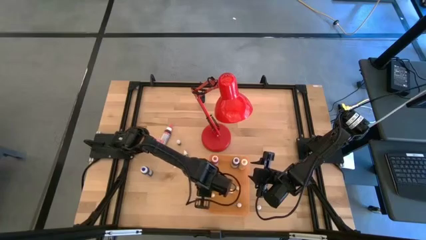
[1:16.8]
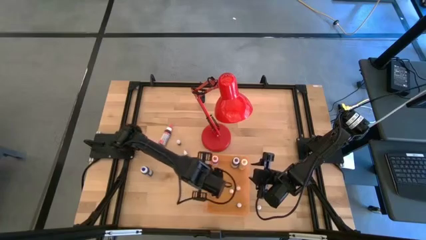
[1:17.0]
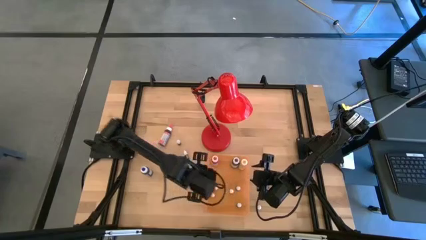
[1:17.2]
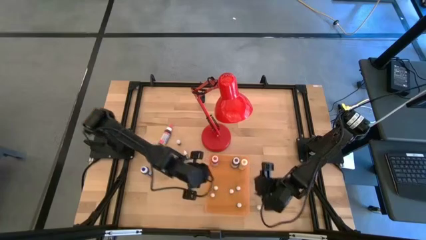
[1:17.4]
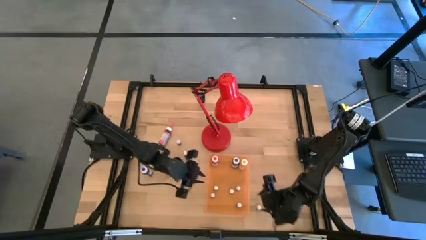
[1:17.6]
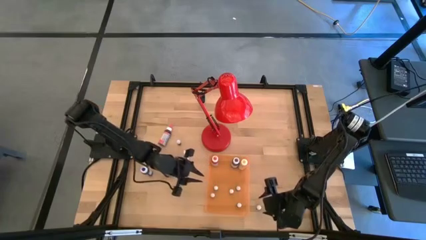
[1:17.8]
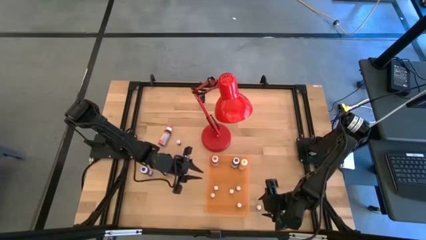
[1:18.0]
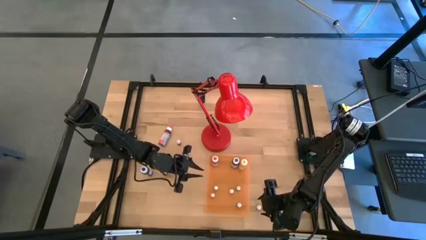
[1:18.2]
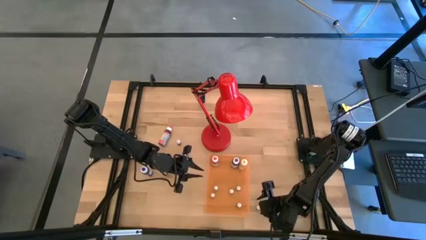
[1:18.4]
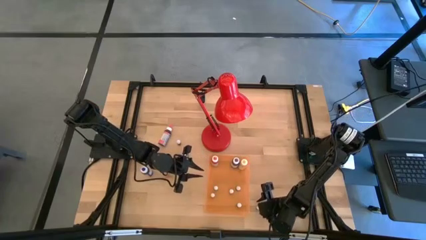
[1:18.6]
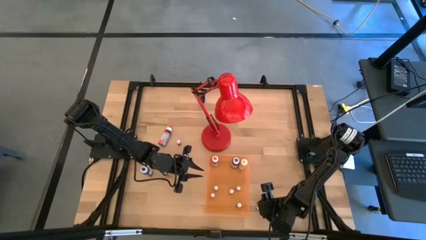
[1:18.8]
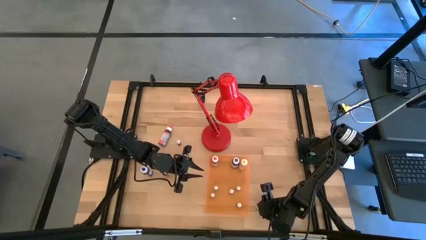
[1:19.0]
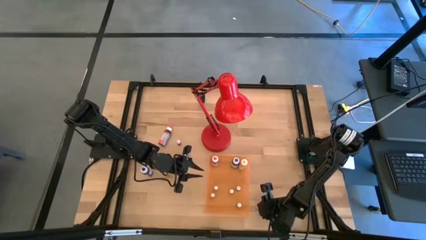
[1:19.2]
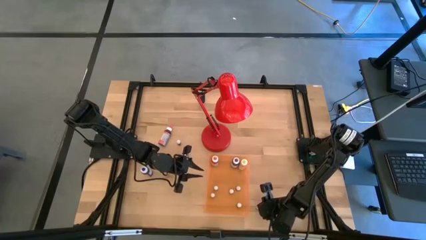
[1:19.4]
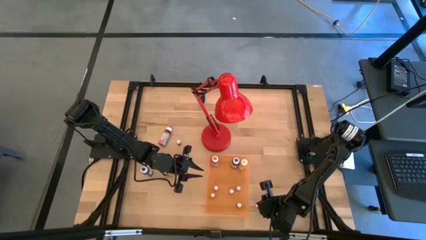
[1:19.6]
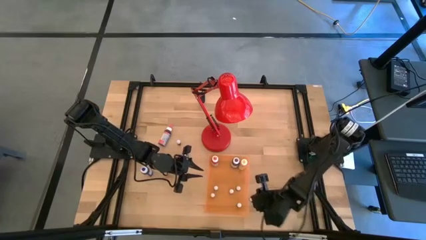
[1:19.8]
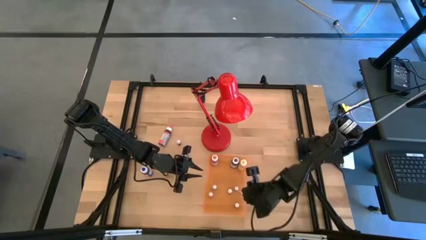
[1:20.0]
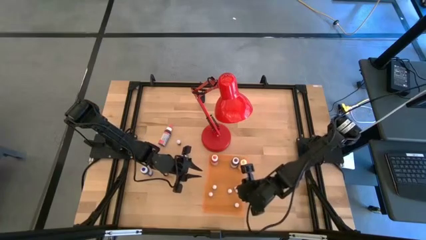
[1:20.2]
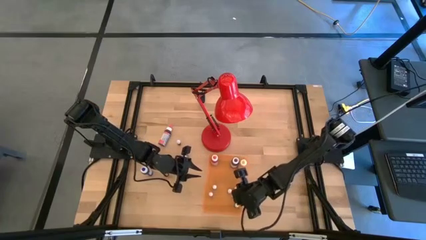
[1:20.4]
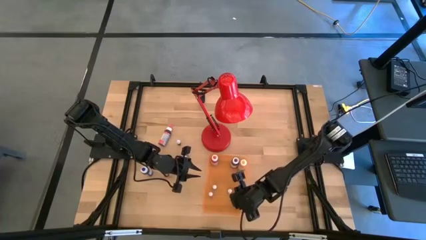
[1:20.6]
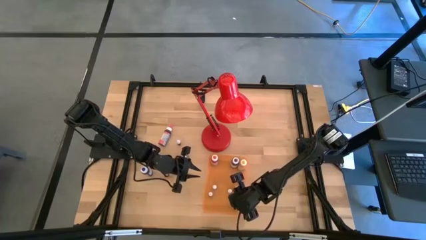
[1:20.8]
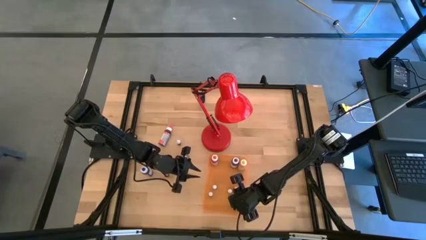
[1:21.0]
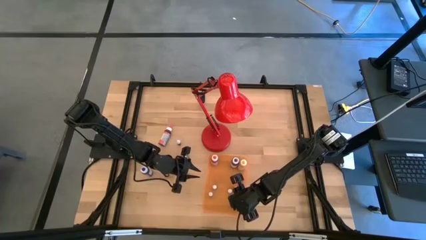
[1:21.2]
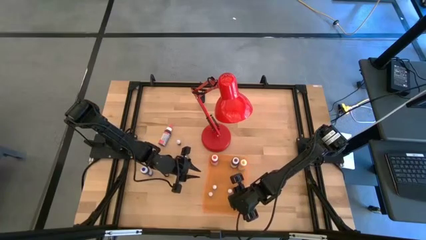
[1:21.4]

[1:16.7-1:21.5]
Task: Pick & Place food coloring
Put the bottom small black food coloring bottle into the orange bin

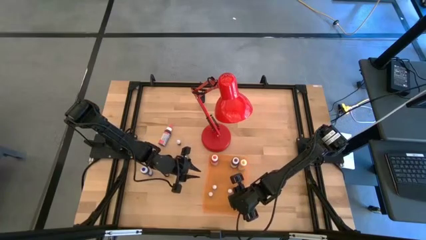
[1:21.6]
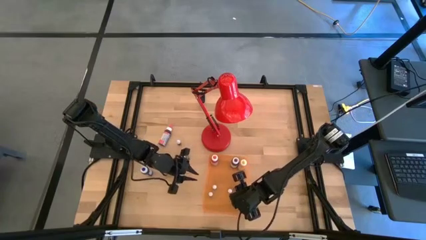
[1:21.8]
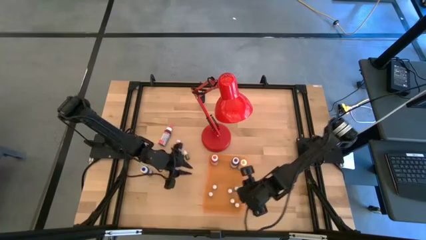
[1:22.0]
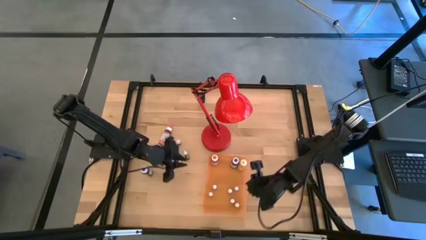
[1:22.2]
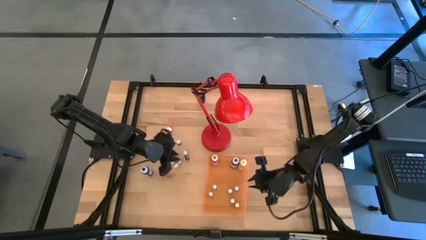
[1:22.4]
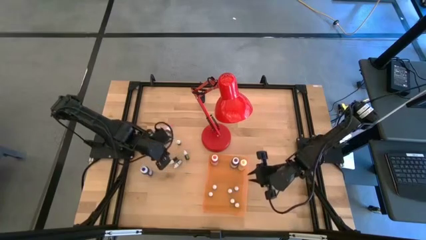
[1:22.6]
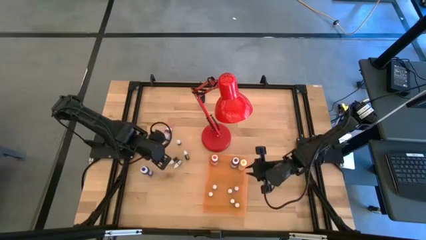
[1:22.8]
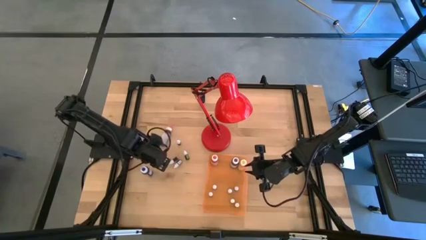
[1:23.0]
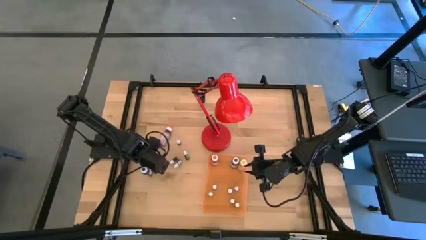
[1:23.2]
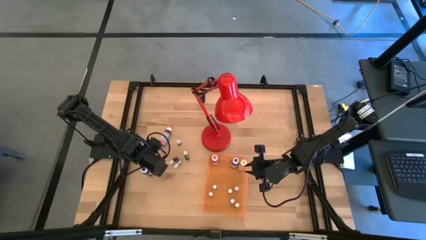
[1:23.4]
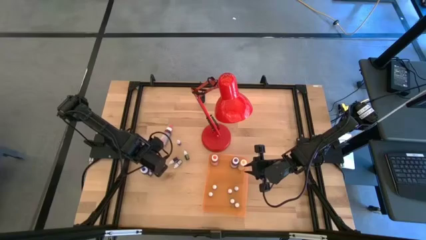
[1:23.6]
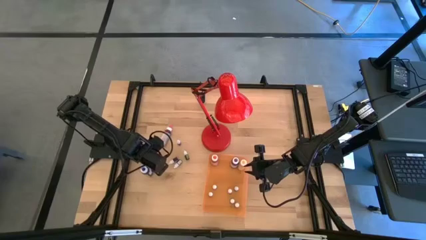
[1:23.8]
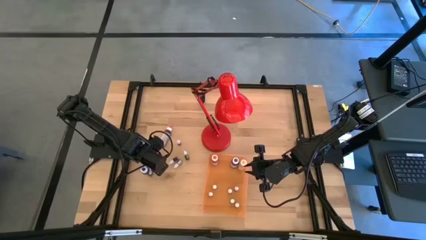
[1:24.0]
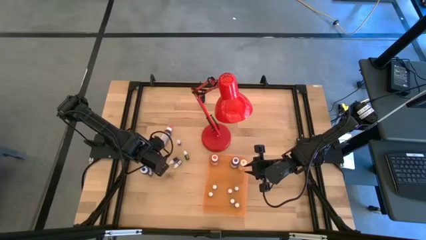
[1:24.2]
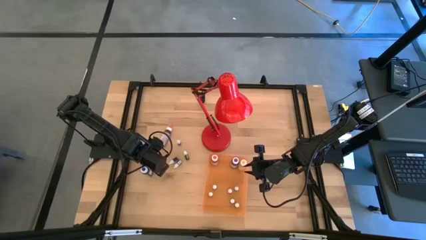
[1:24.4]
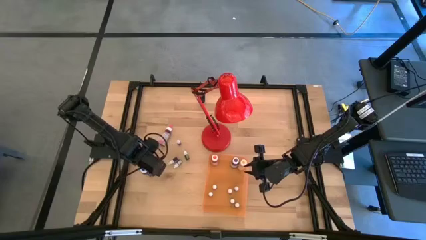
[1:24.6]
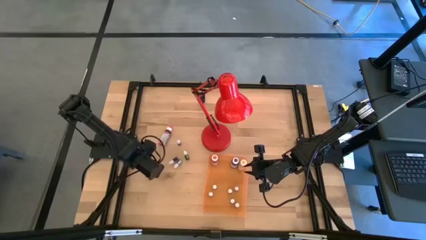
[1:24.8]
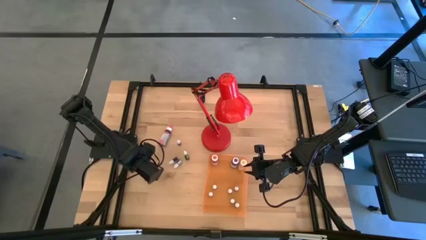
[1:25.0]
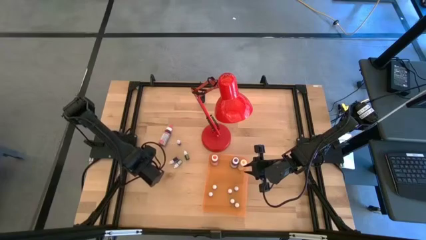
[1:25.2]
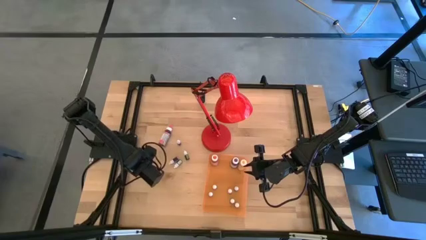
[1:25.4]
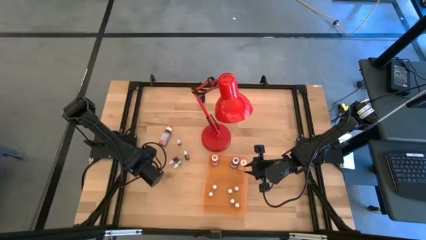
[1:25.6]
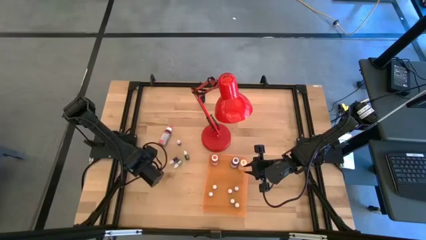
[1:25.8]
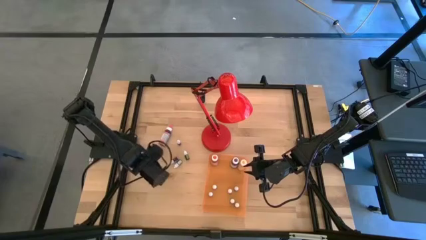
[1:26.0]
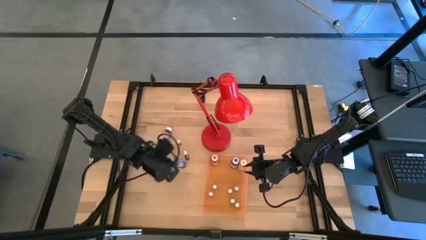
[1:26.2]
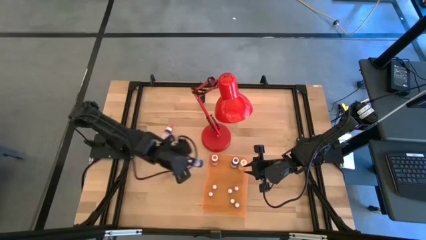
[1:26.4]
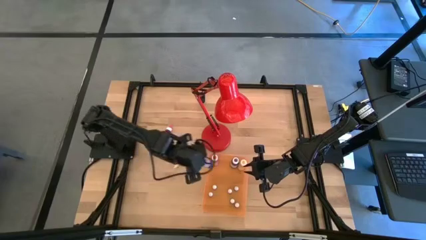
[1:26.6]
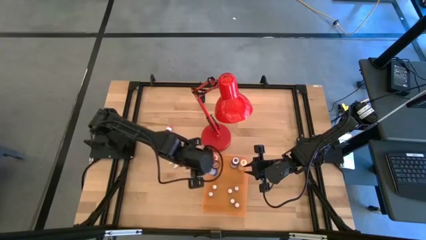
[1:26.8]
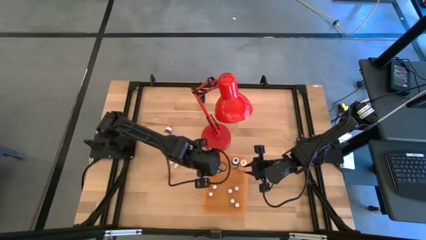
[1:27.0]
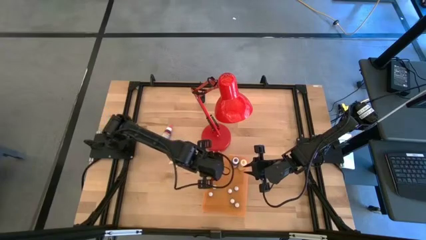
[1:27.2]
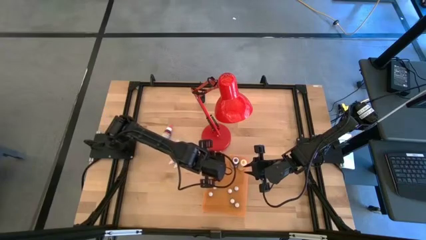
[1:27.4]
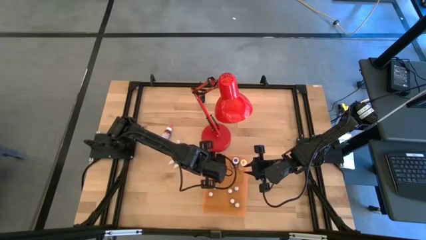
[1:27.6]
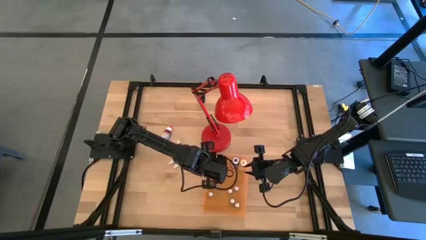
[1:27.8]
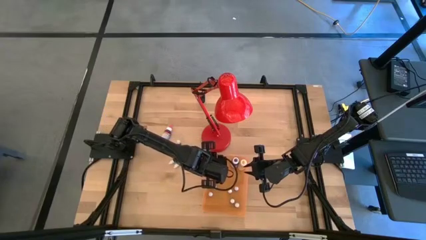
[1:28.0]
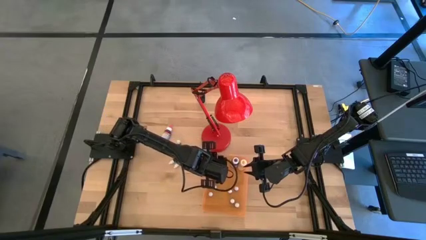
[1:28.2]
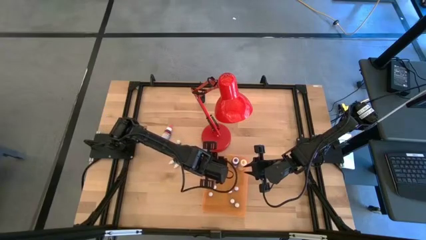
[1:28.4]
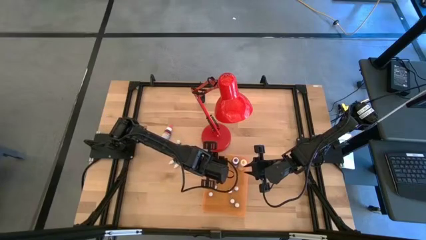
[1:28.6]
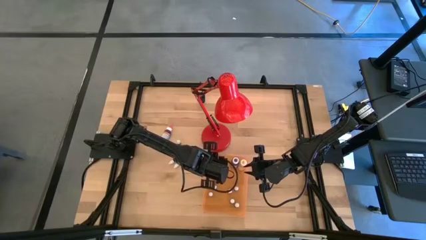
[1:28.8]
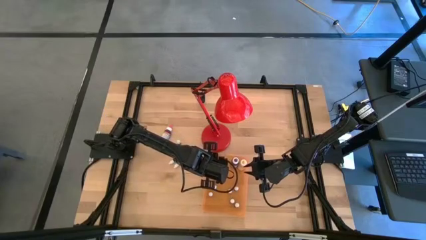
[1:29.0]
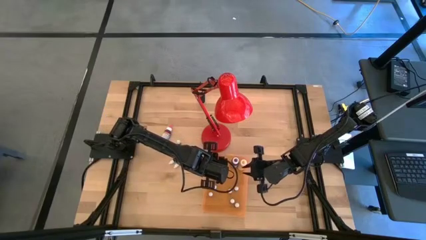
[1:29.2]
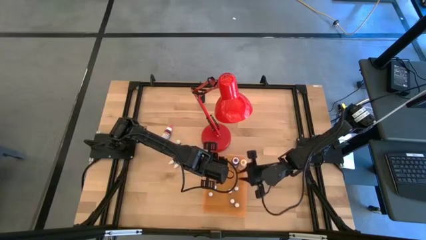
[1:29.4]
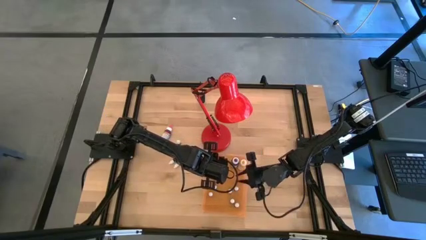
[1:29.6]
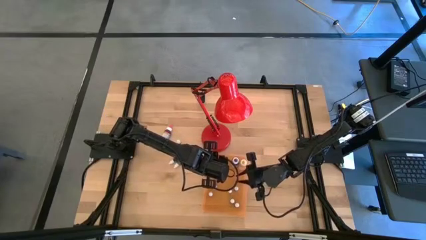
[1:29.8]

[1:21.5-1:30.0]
Put the large blue food coloring bottle into the orange bin

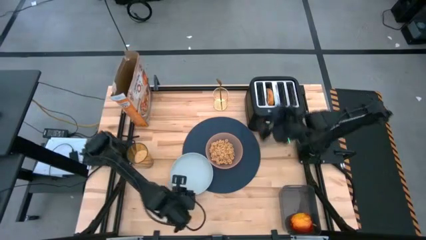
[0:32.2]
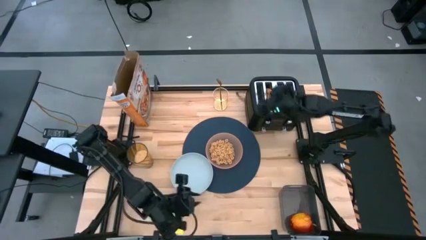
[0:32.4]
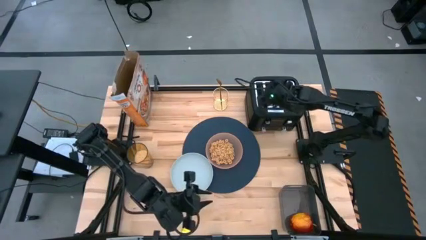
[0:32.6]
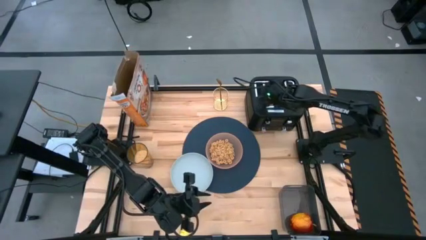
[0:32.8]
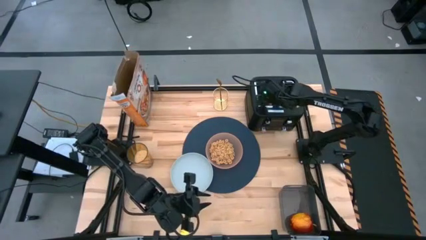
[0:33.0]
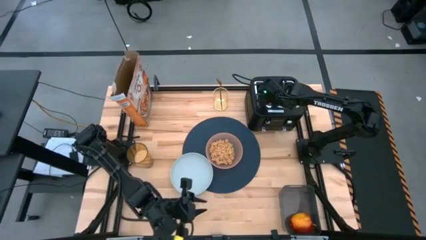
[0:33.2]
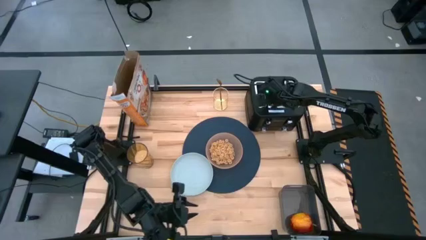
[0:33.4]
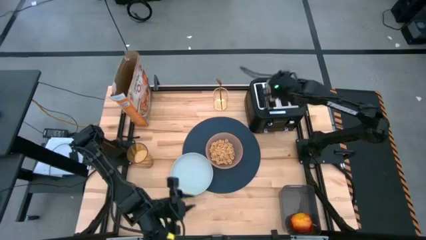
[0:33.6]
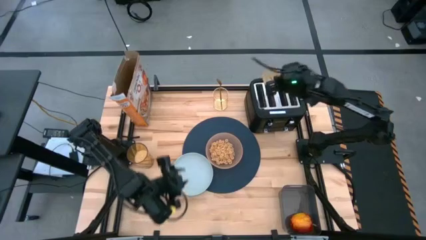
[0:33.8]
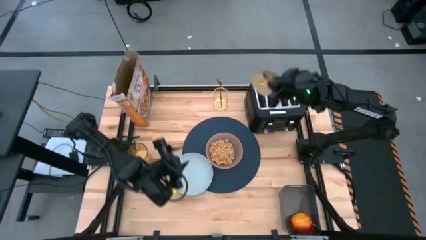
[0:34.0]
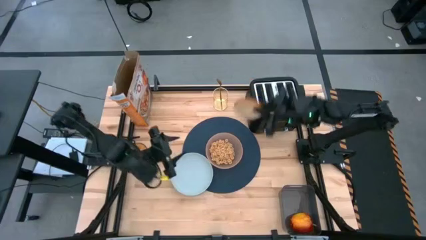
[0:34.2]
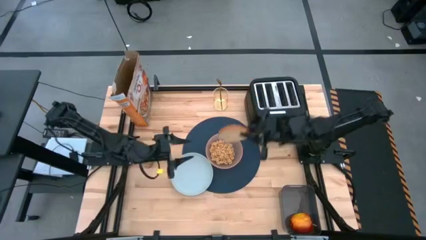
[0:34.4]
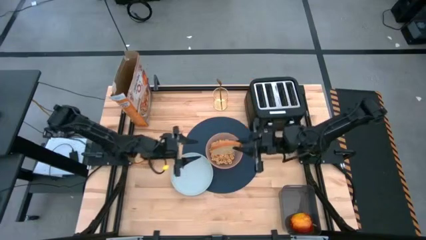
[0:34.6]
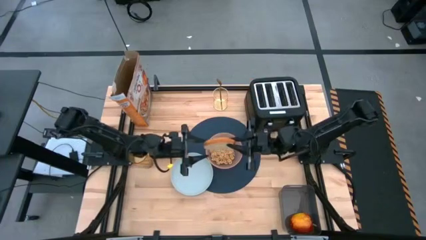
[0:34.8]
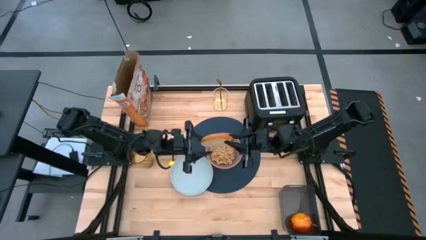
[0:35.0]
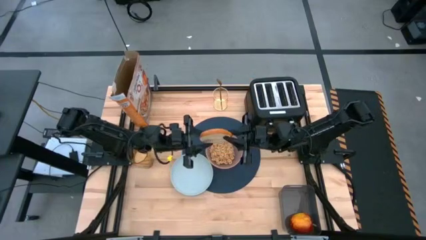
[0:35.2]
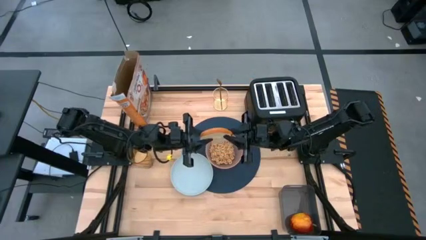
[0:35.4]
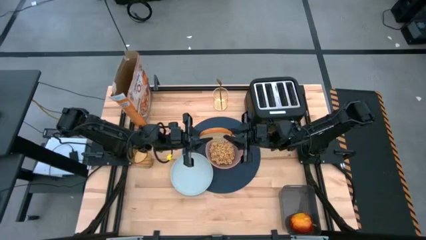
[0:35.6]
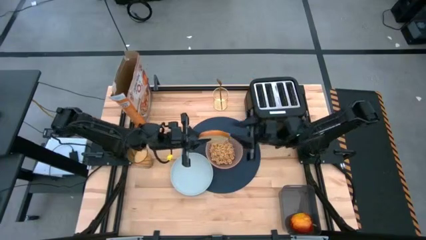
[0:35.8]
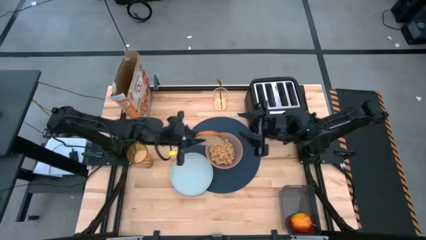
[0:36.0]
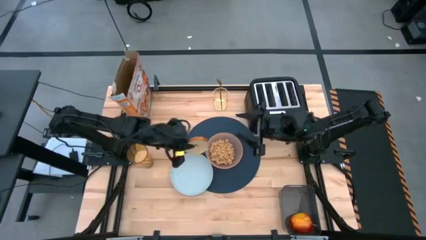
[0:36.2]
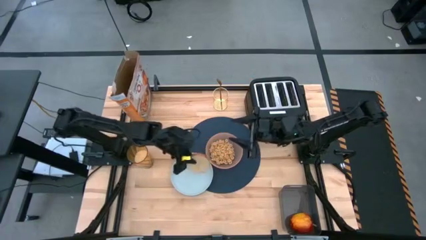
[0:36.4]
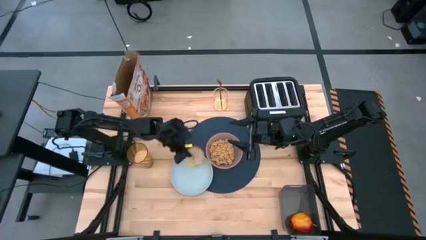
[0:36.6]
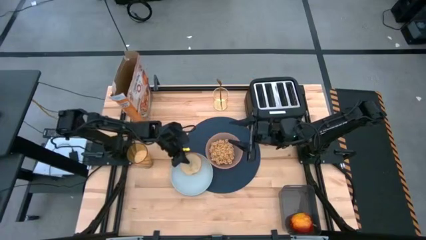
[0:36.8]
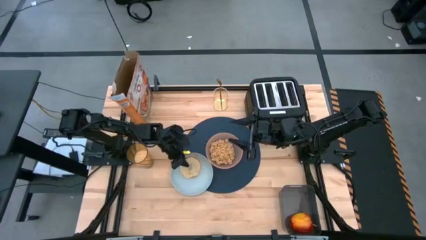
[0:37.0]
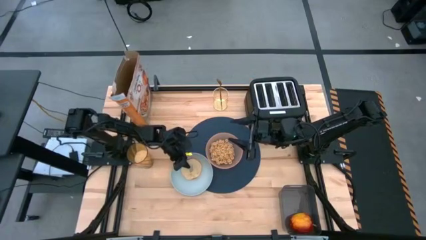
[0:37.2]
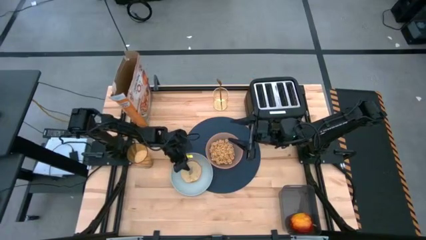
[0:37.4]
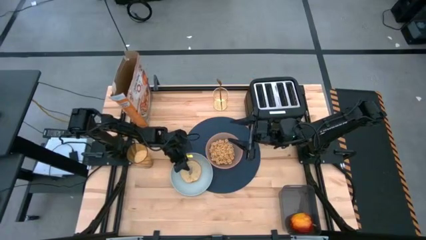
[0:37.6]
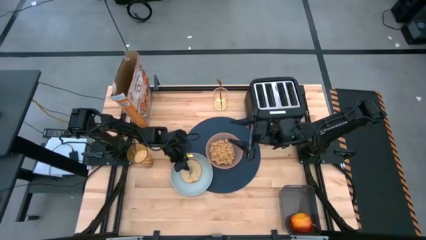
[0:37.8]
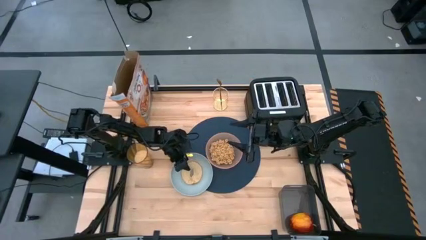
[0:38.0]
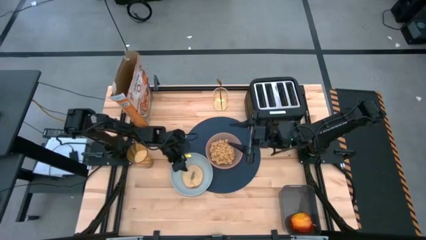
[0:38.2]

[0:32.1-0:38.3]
Task: Arrange a breakfast setting
Put the toasted bagel from the toaster on the light blue plate
